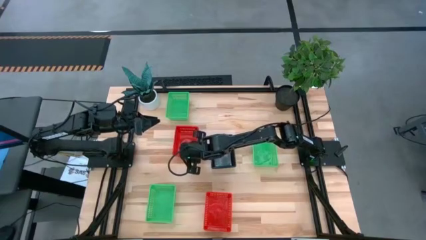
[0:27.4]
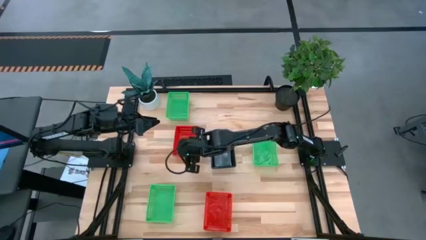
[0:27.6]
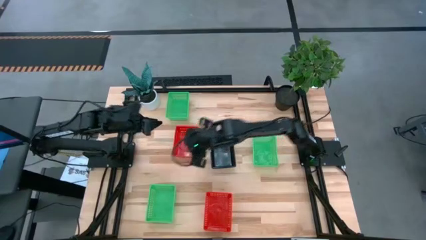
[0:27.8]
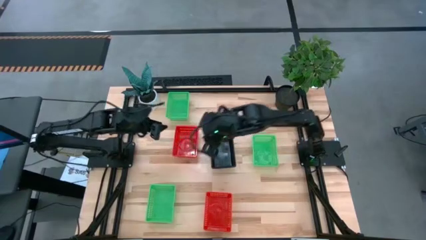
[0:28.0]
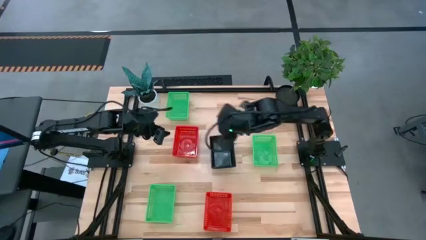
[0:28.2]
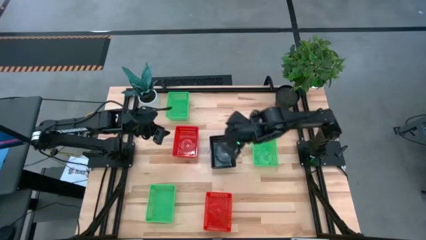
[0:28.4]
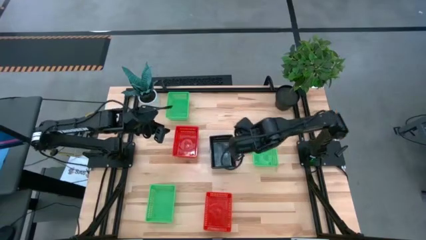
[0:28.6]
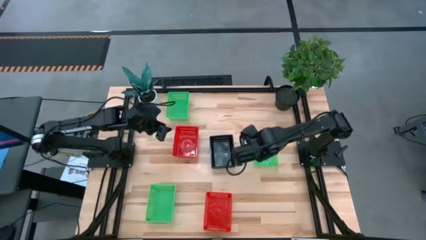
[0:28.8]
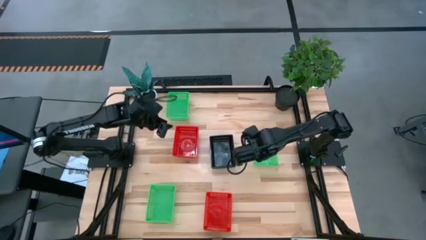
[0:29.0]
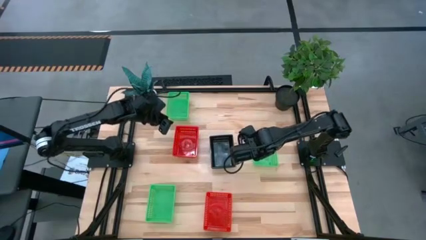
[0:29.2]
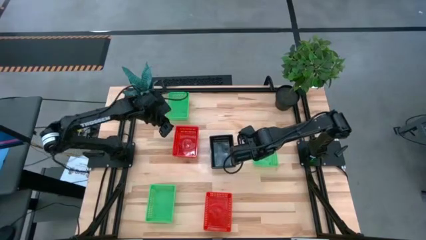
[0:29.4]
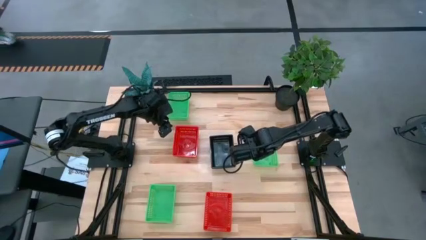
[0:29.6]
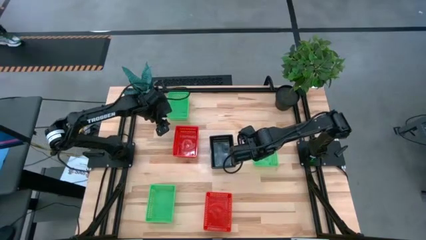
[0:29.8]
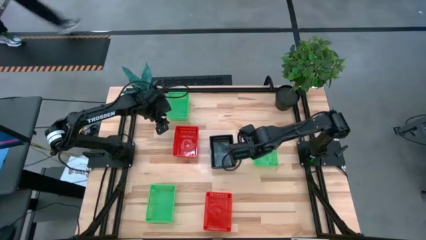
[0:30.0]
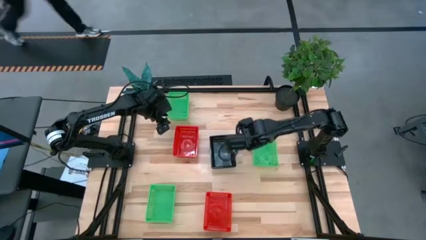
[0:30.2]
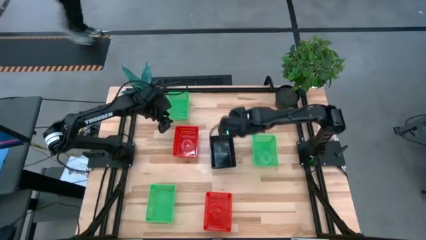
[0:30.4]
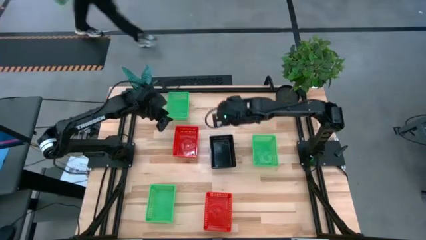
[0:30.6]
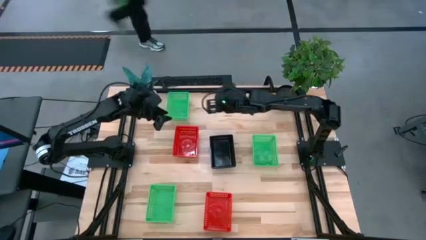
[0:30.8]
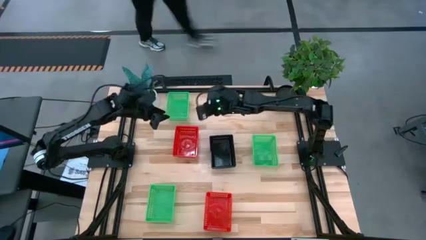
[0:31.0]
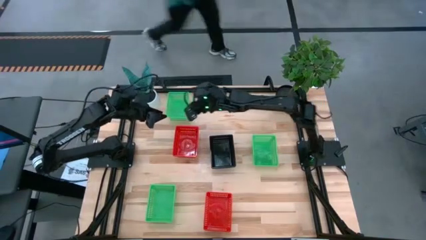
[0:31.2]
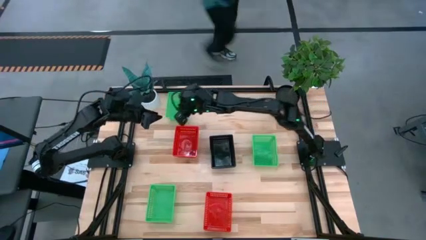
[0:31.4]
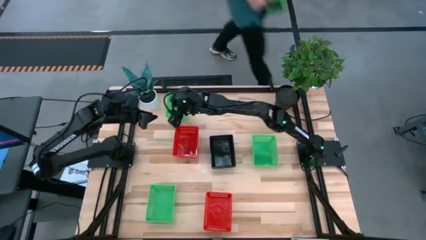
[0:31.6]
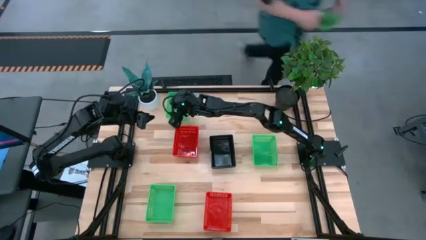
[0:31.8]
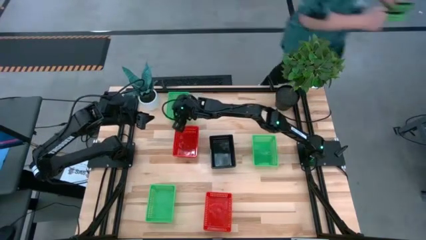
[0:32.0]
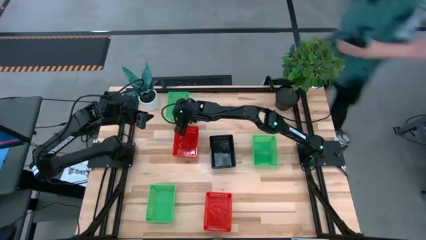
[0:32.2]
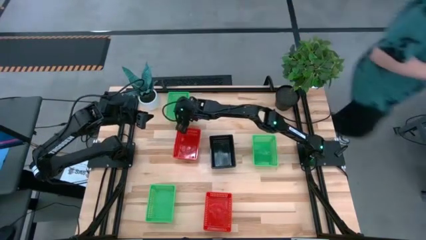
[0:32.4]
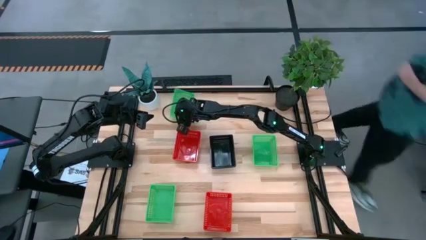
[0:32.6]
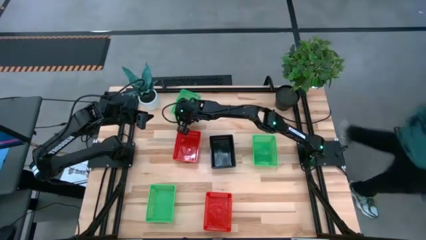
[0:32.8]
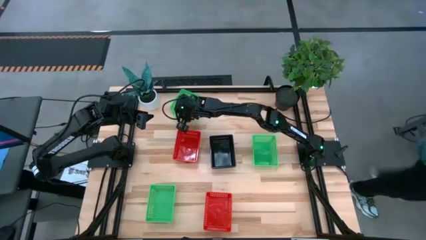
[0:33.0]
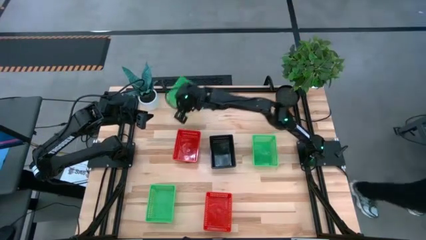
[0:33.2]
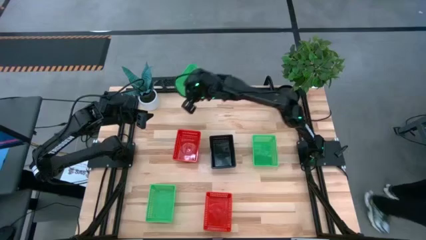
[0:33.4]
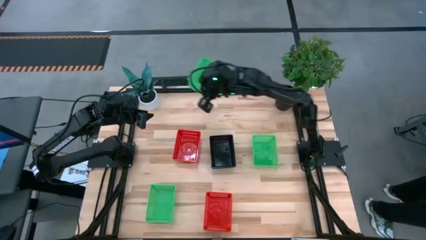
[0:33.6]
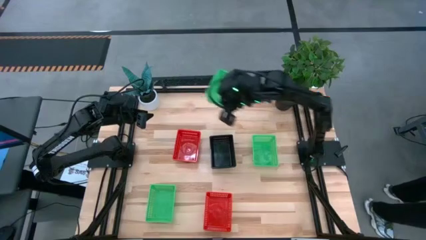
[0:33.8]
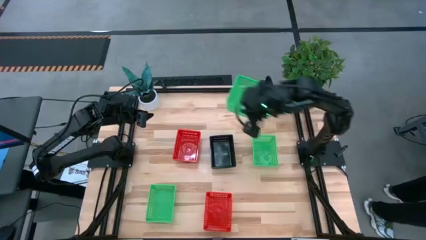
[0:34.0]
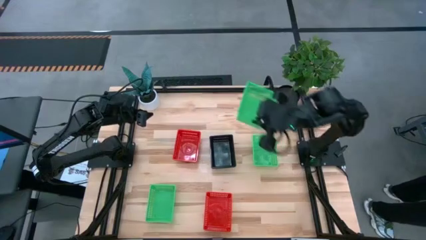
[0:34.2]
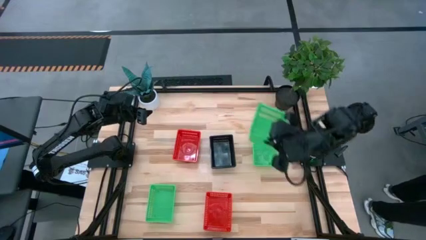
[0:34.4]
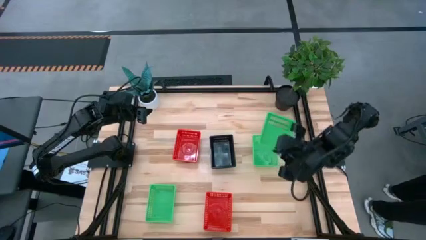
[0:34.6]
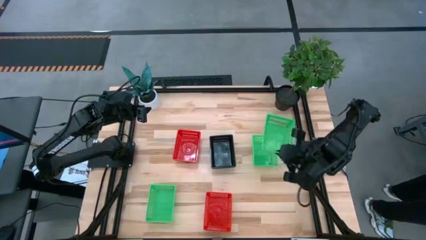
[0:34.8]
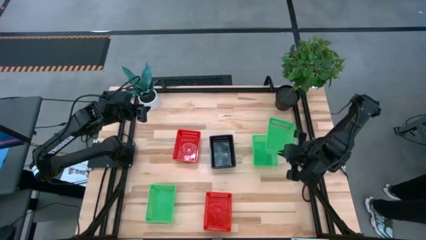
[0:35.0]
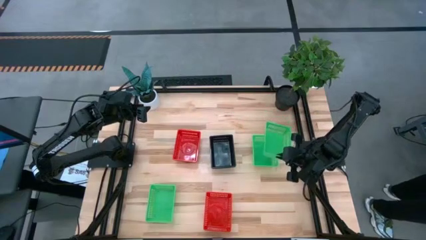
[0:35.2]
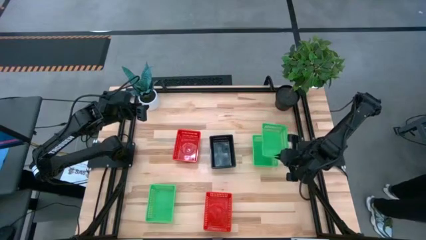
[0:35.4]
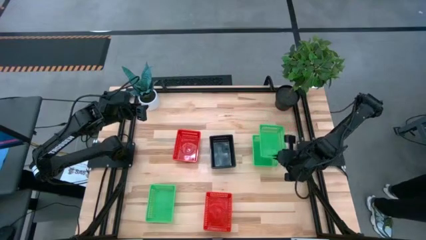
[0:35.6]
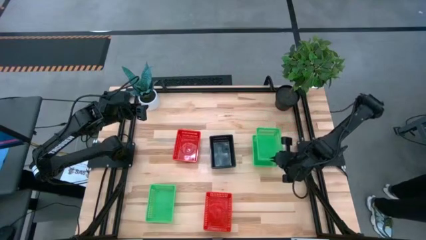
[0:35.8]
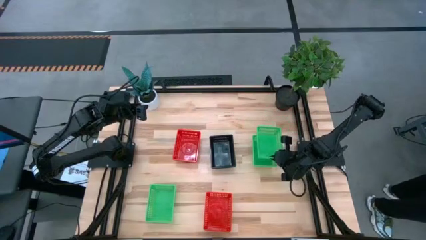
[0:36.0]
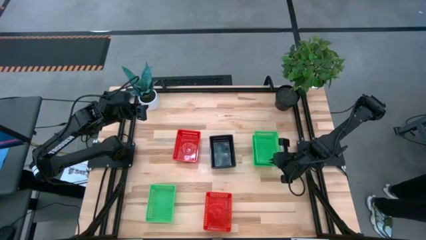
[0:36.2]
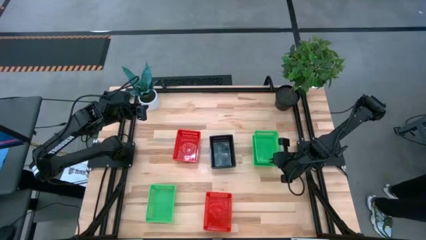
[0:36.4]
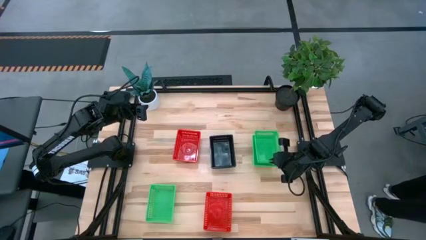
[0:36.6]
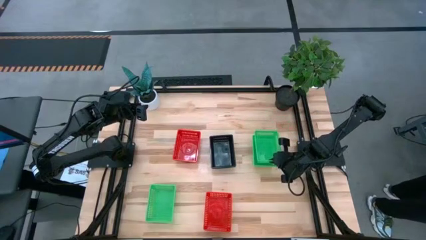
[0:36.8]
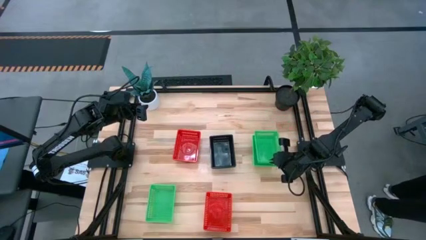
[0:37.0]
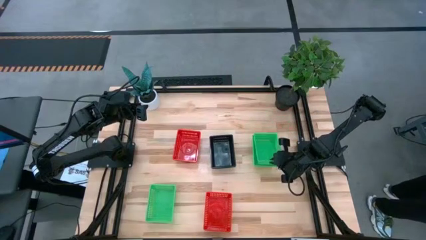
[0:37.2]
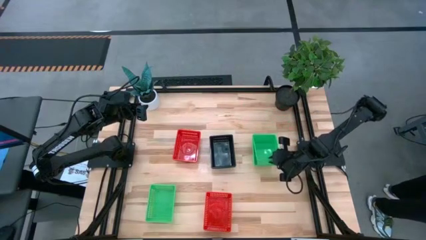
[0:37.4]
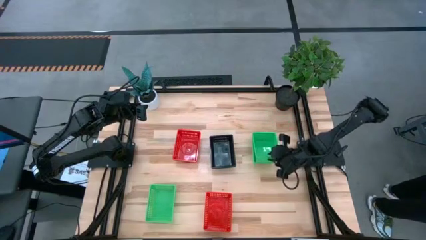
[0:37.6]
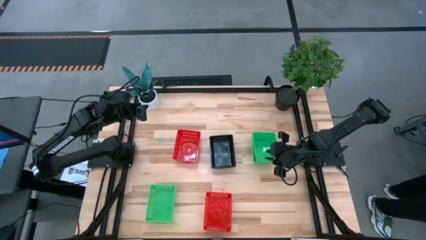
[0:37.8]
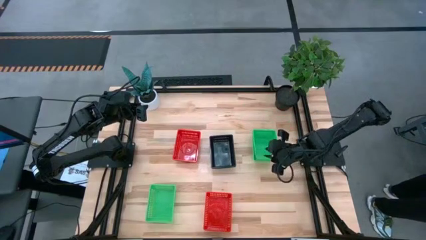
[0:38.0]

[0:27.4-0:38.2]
Stack the top green basket on the right green basket

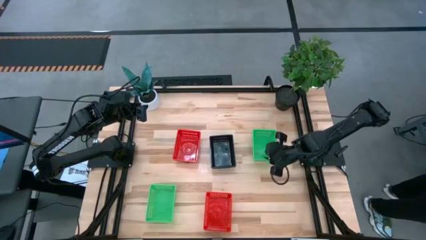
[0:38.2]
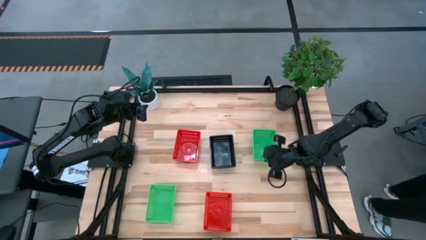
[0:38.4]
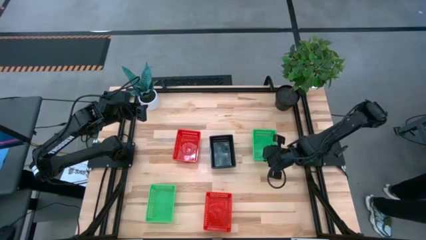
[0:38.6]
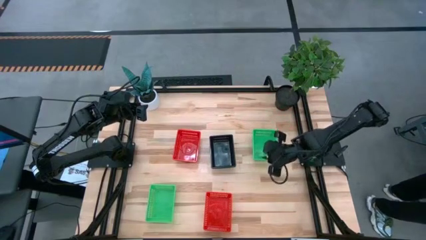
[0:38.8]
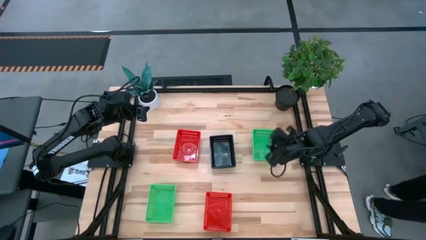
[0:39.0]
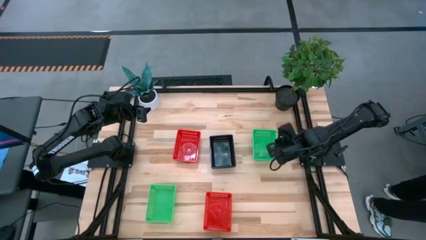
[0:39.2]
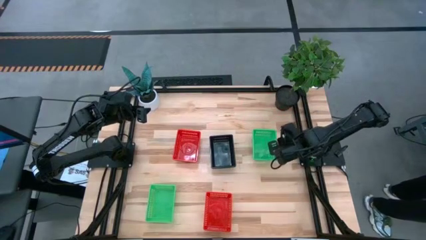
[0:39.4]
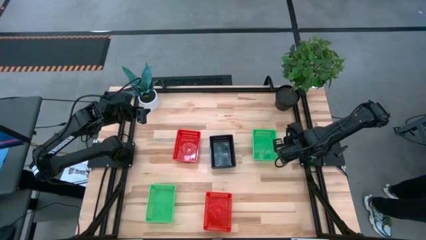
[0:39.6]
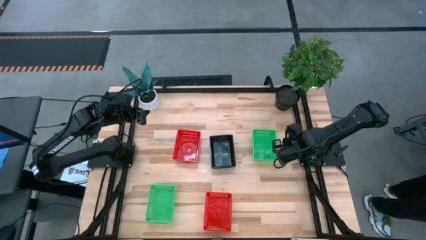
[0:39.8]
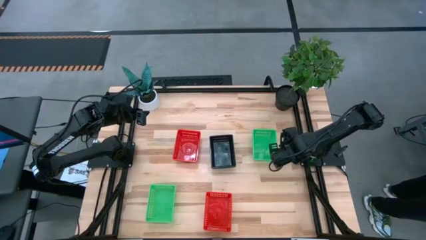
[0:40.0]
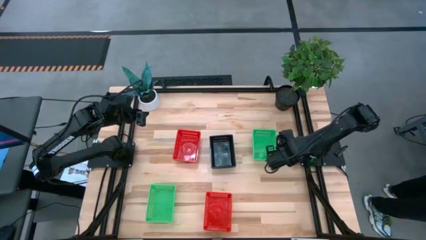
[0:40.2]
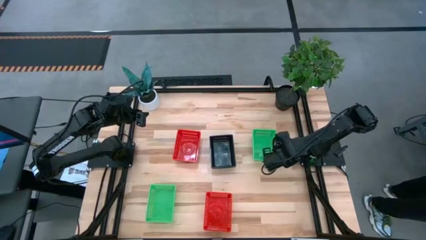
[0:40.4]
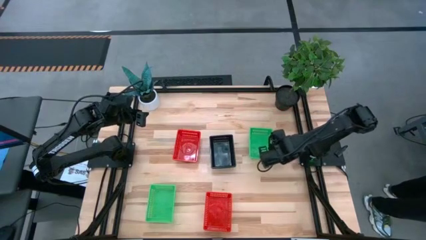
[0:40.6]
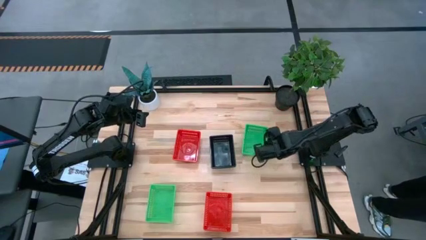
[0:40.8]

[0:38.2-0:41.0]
Adjust the stack of green baskets

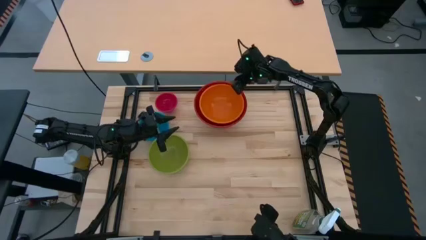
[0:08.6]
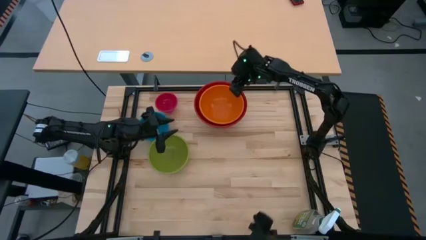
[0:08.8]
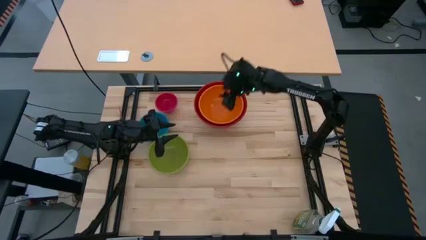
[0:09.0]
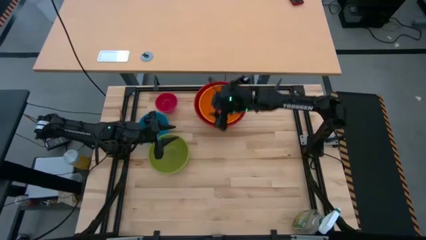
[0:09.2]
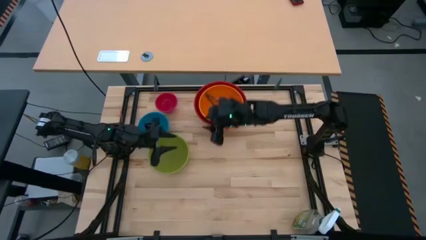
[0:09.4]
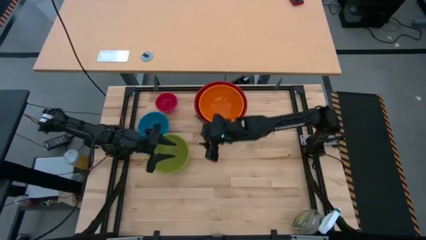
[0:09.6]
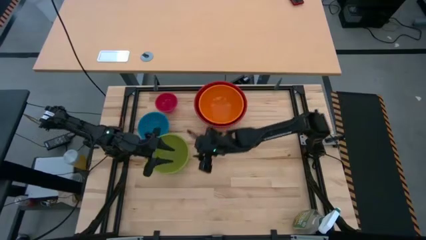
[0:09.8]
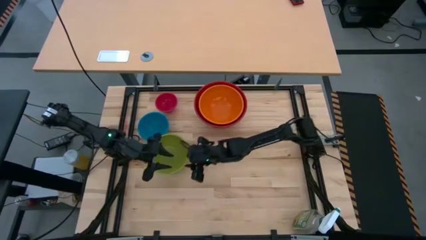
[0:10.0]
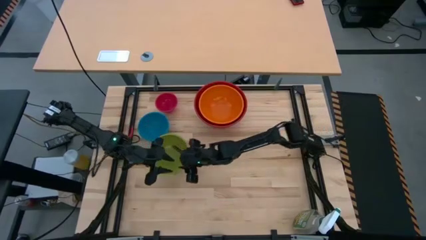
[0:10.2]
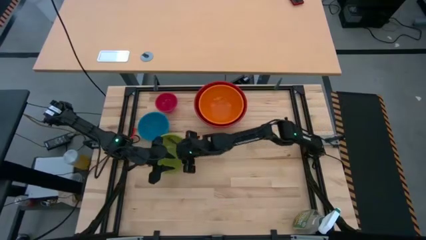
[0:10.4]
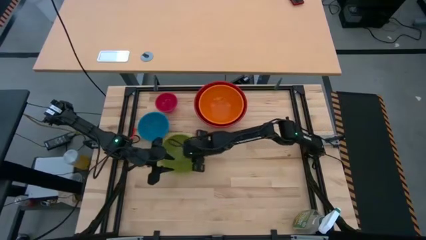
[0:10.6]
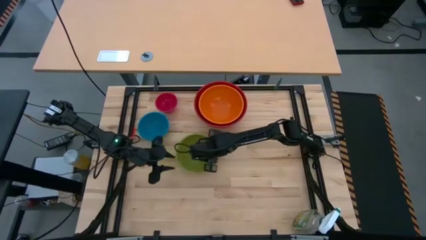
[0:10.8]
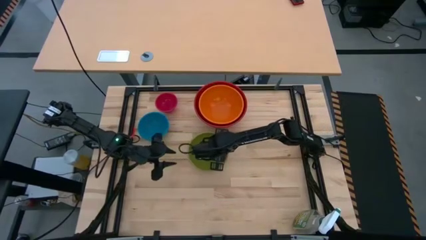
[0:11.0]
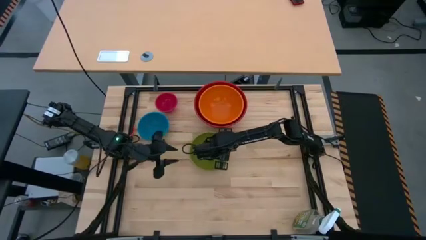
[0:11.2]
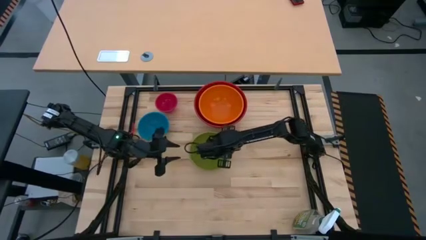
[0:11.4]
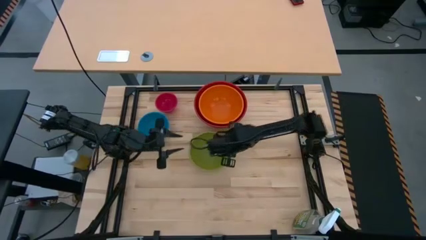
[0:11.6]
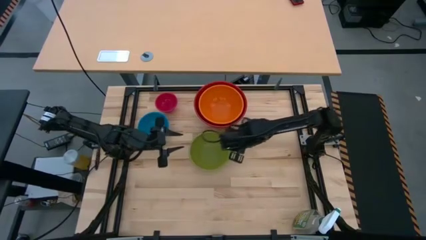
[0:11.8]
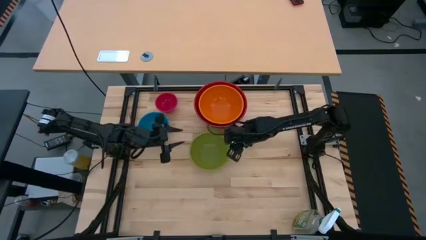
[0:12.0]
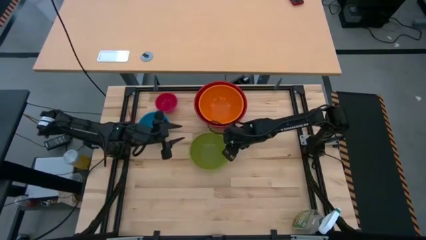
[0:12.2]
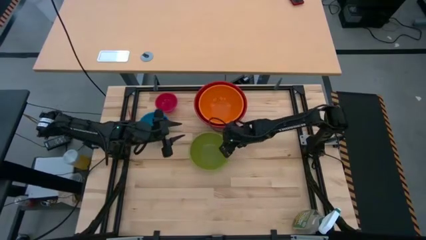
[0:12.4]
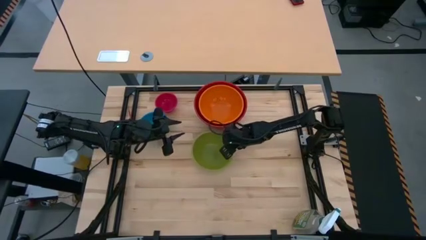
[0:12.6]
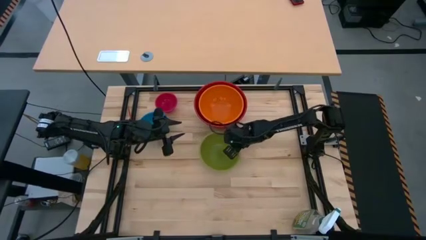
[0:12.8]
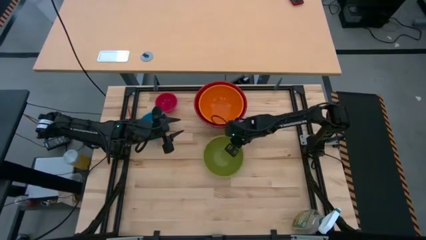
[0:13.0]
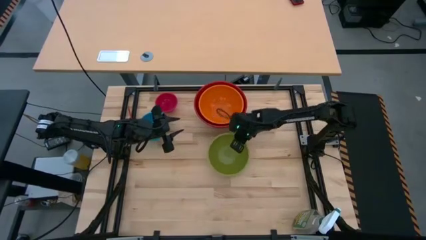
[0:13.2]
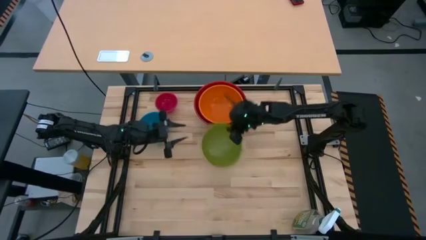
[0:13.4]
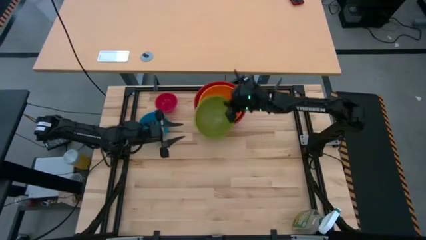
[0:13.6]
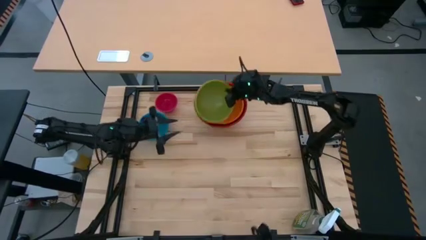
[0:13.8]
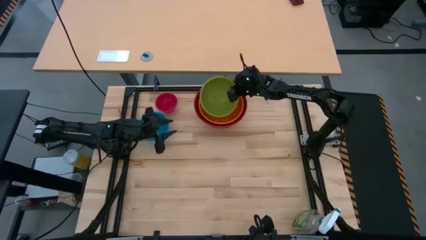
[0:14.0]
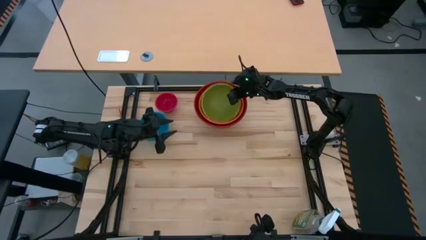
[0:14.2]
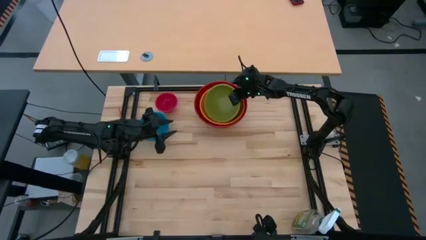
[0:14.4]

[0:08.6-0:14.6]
Stack the green bowl on top of the orange bowl
